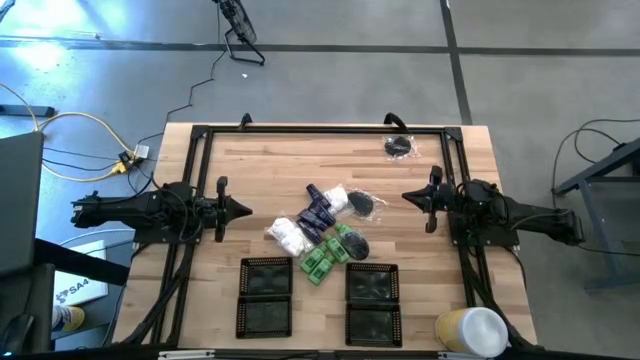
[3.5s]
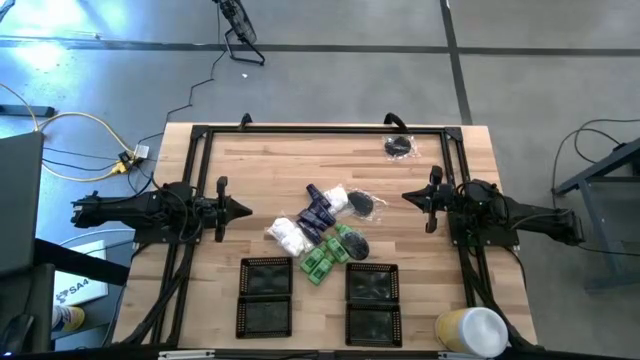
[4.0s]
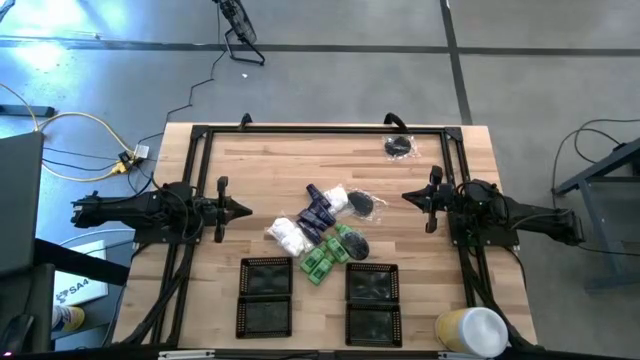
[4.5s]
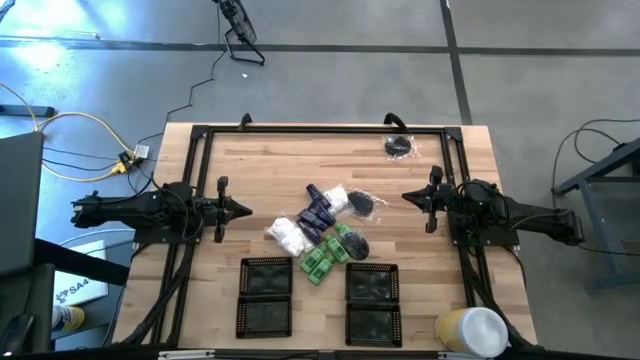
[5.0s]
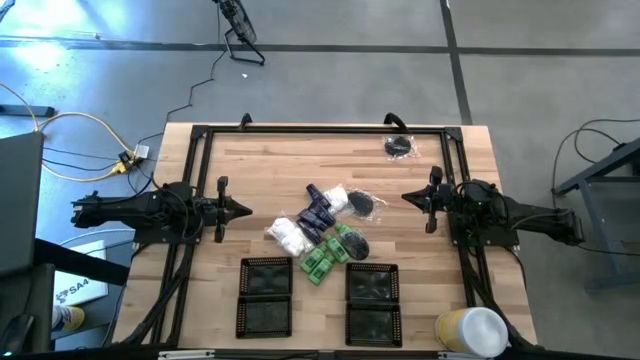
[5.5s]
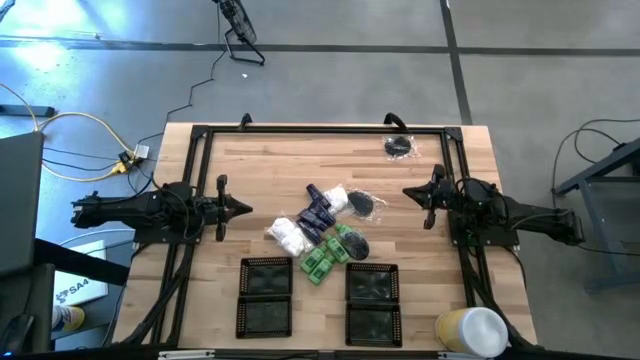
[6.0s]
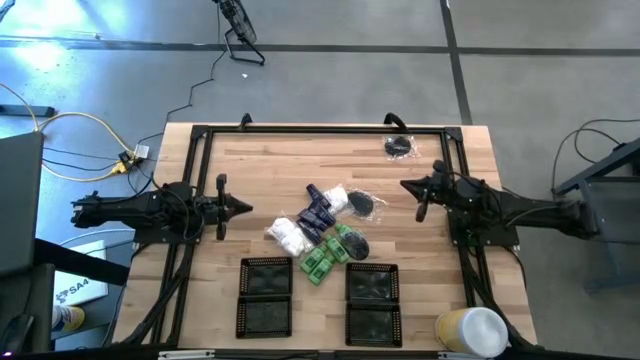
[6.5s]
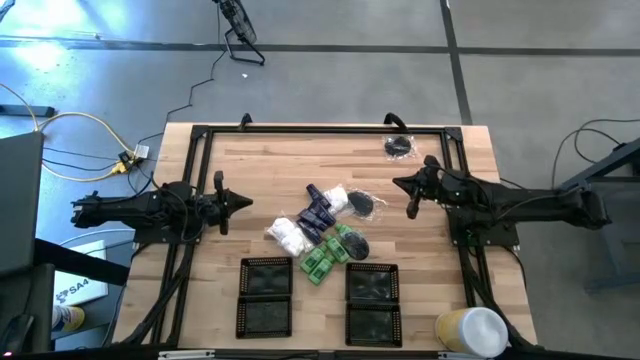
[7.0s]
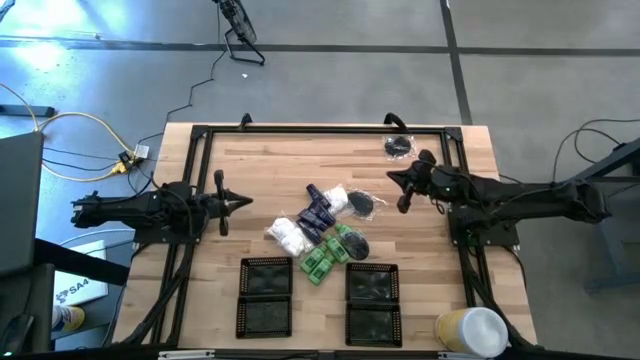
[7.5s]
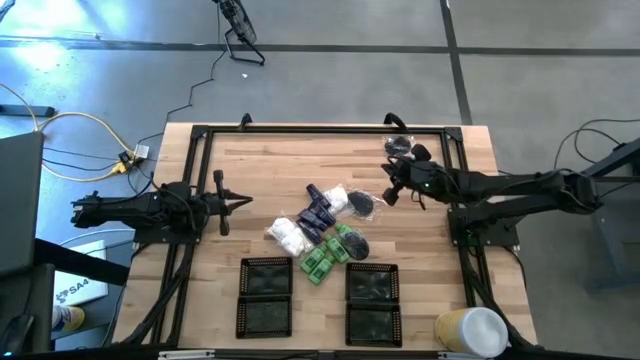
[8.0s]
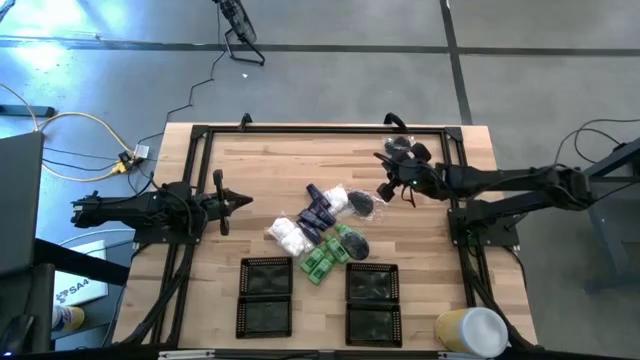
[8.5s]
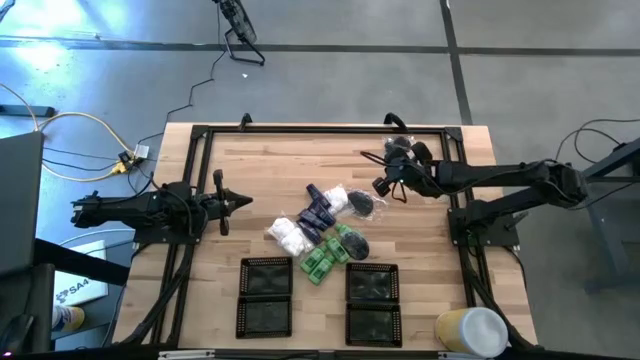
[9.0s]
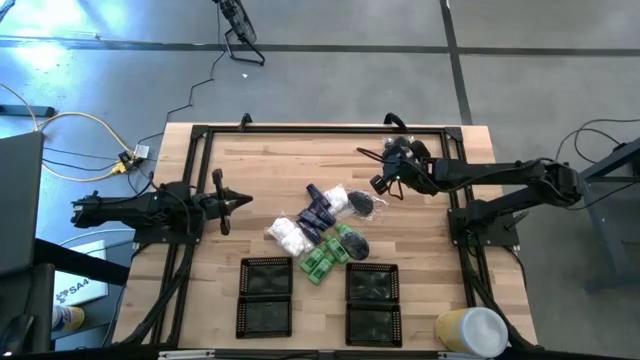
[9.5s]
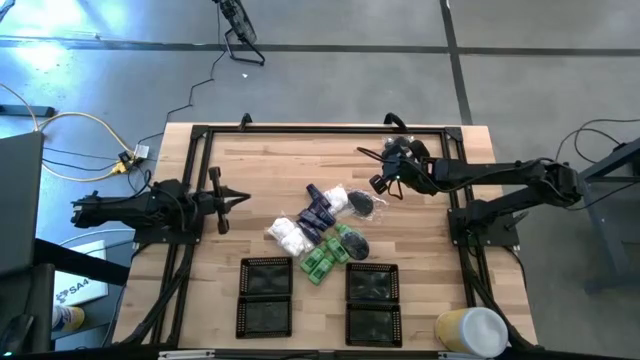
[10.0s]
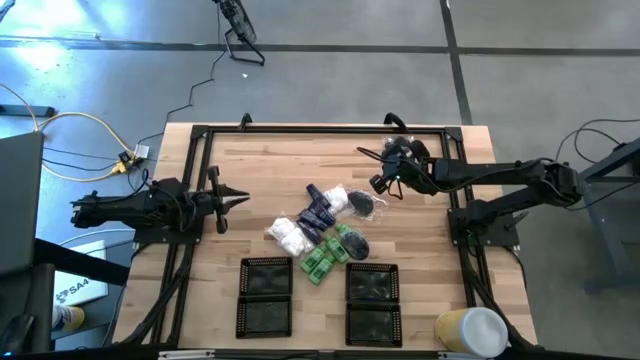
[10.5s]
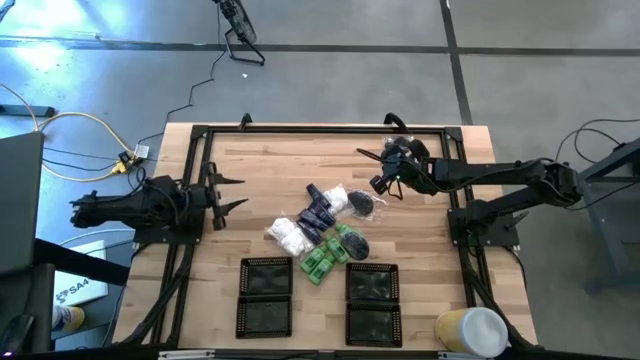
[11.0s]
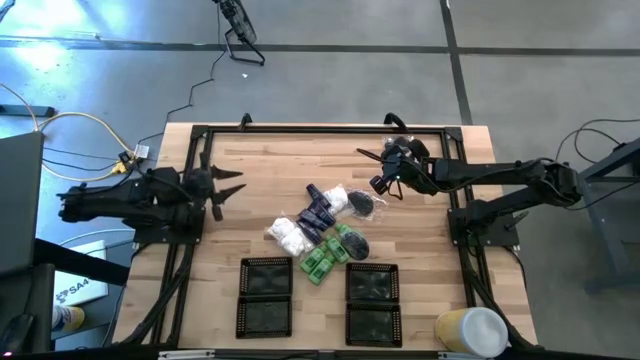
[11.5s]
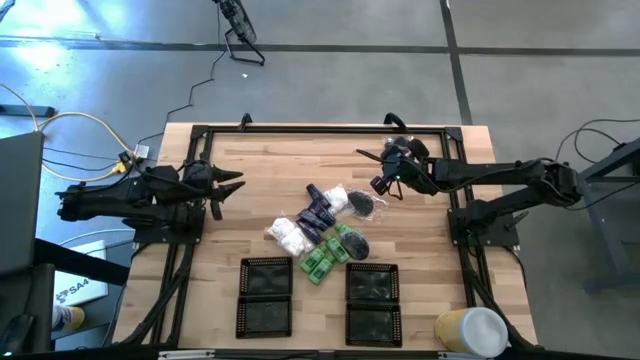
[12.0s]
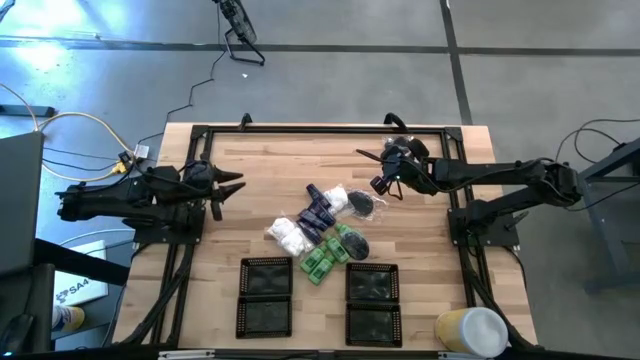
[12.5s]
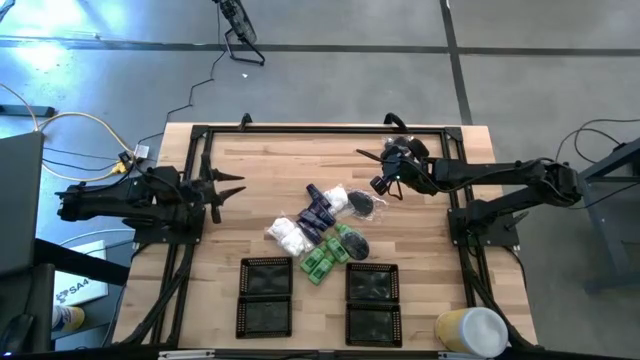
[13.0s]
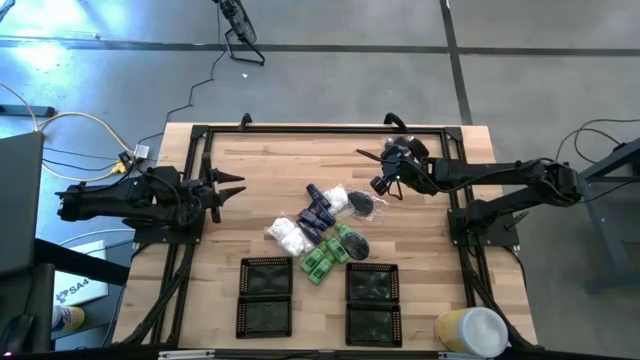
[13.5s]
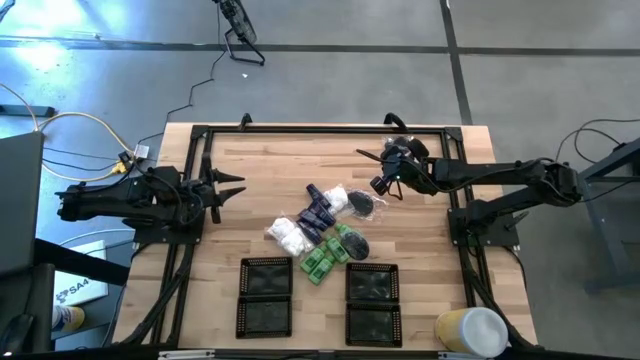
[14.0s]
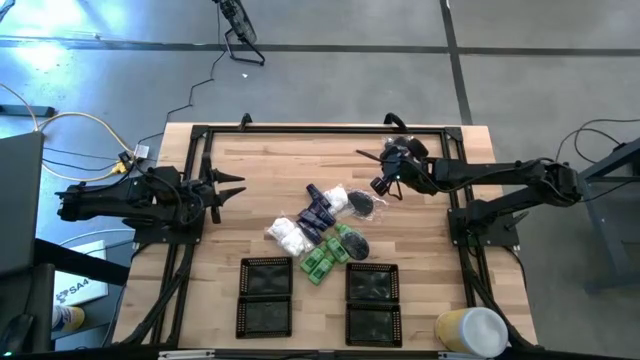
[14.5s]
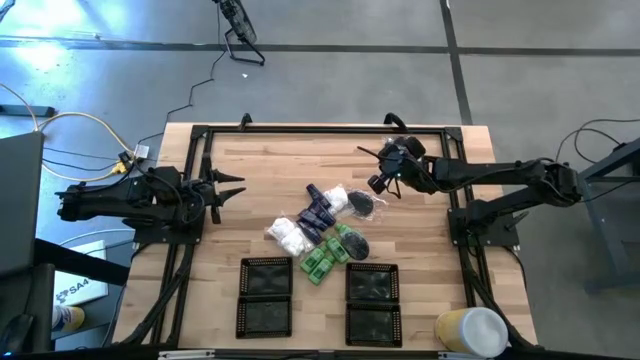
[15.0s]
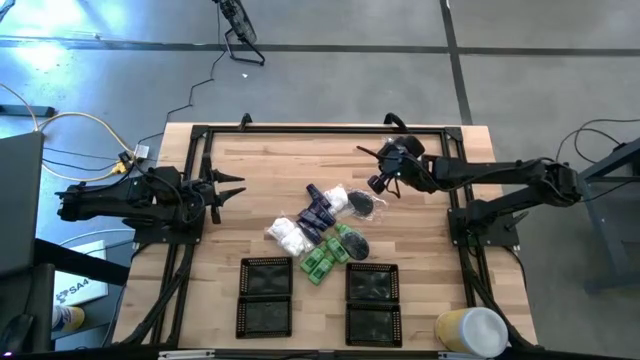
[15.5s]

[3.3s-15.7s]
Task: Pick & Place Travel size toiletries
Put the white cotton pack into the top left black bin

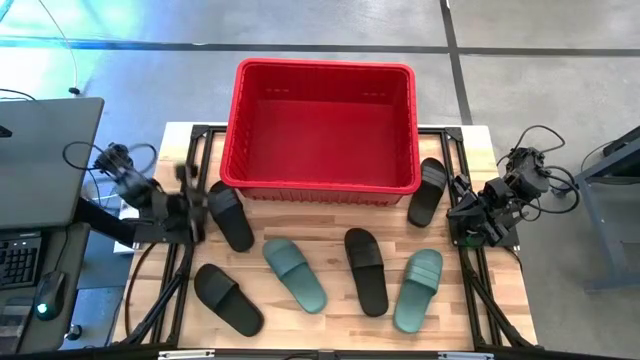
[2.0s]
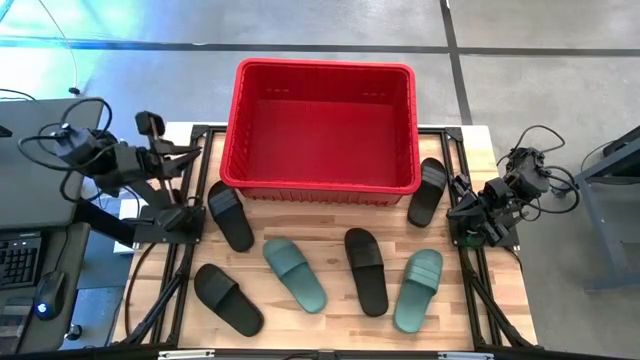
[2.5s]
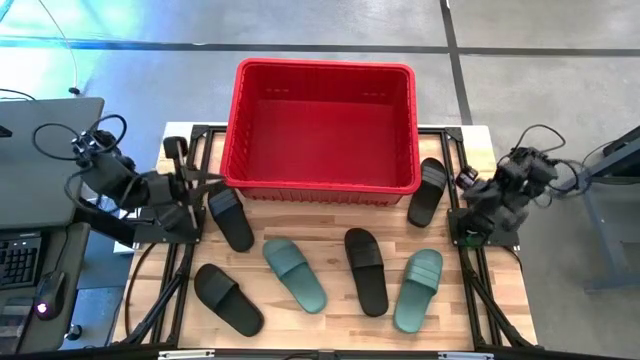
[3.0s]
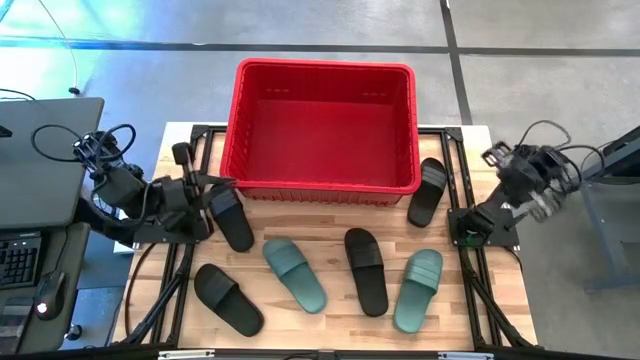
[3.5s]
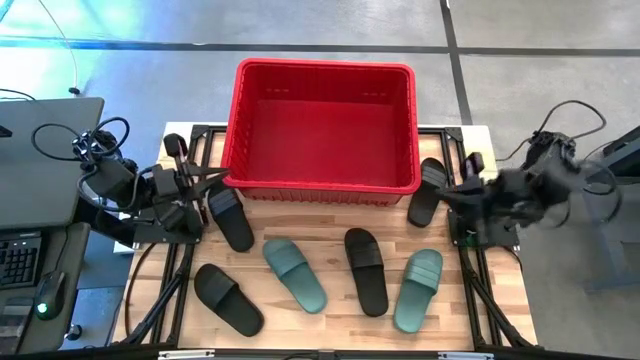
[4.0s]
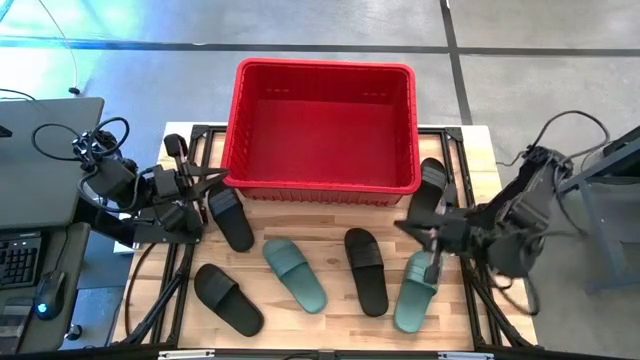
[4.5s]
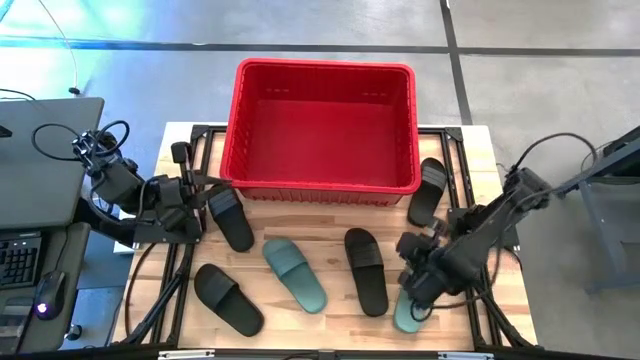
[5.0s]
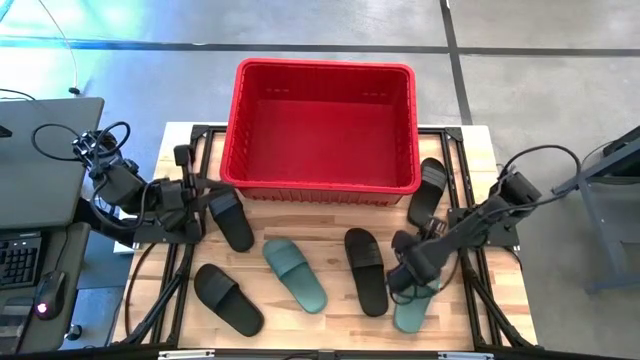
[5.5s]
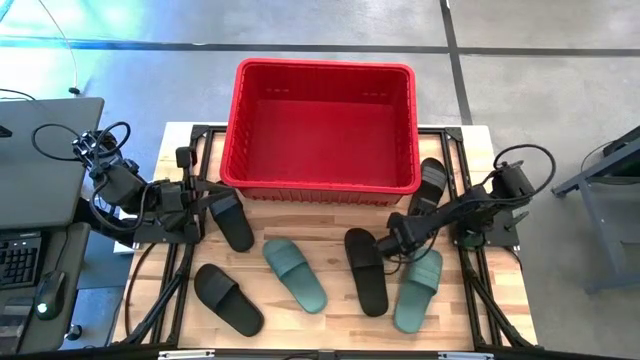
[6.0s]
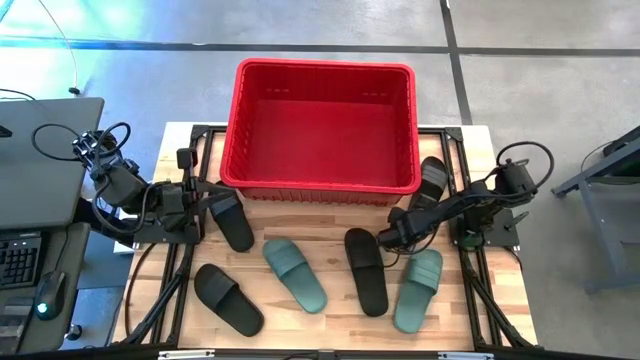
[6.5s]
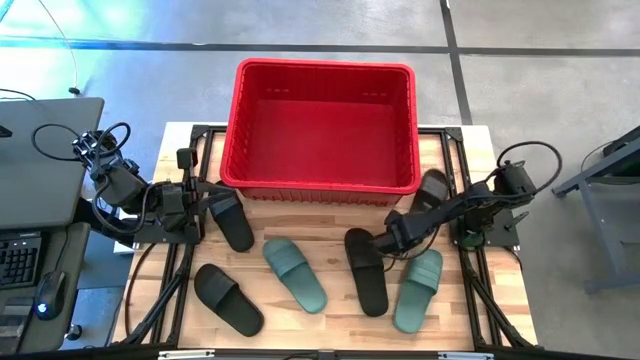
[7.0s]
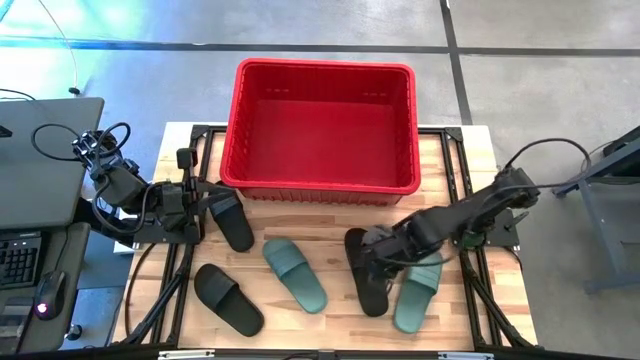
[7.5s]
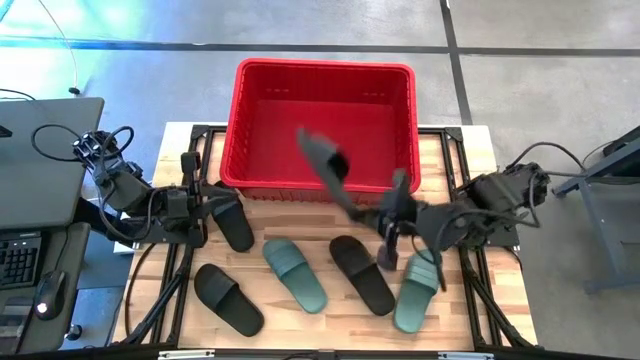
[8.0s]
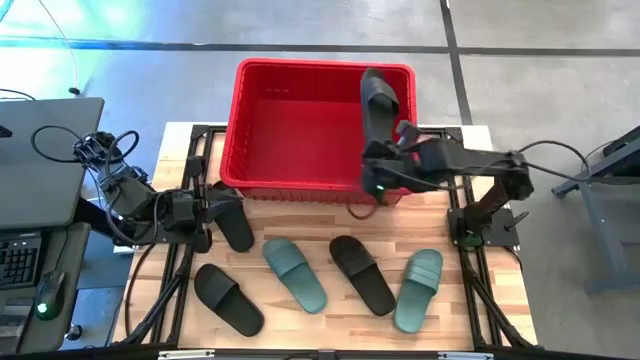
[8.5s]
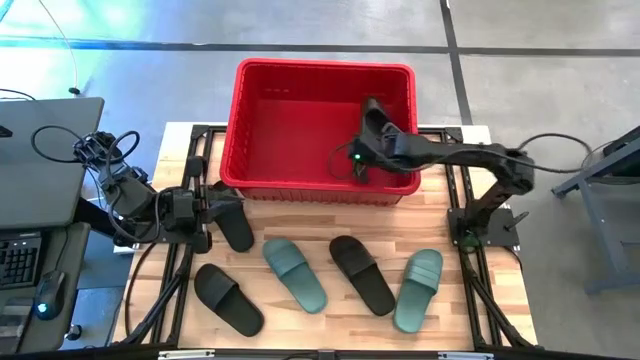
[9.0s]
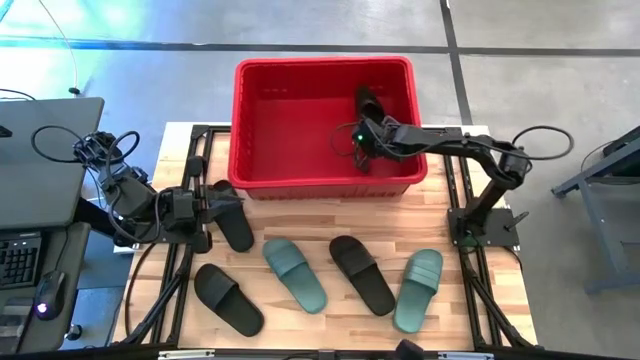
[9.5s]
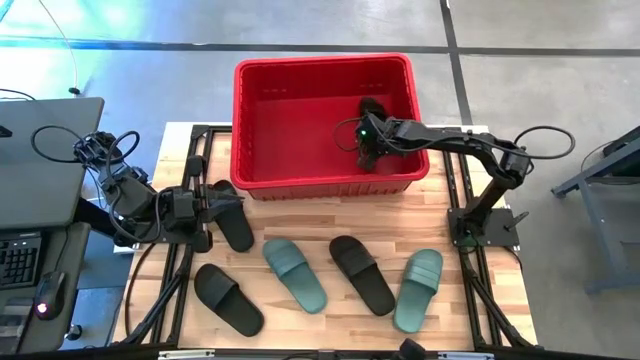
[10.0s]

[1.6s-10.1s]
Task: Pick and place slides into bin
Put the black slide into the red bin
